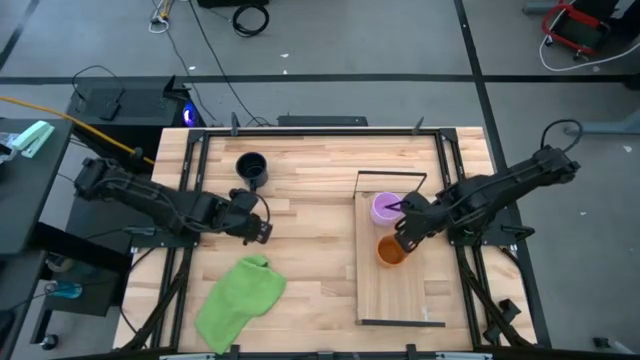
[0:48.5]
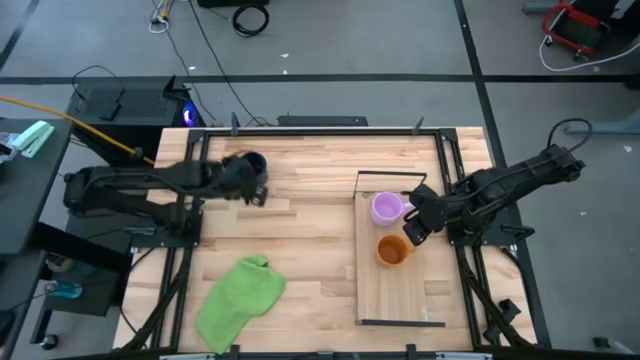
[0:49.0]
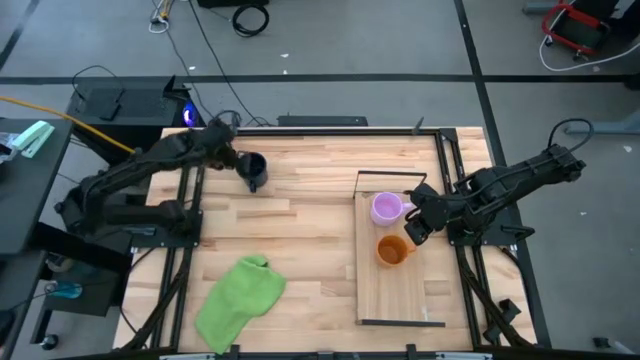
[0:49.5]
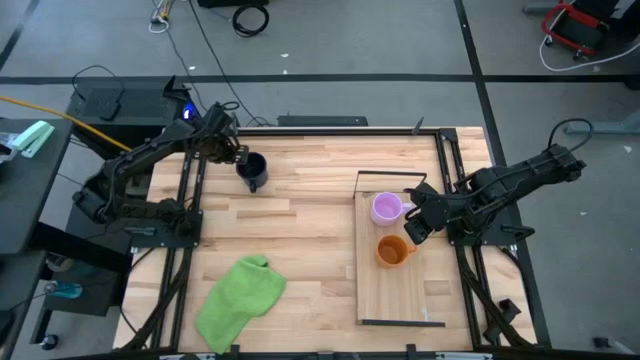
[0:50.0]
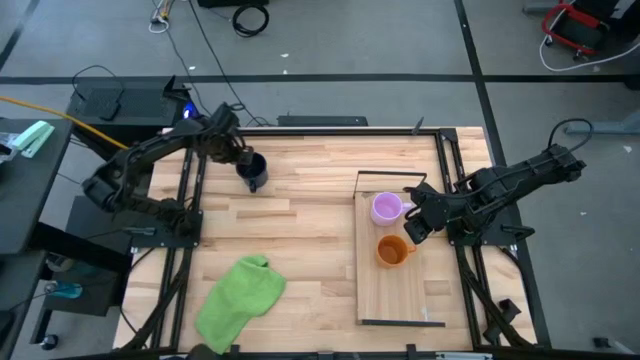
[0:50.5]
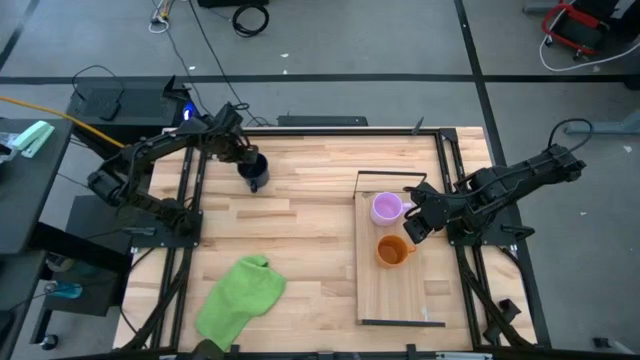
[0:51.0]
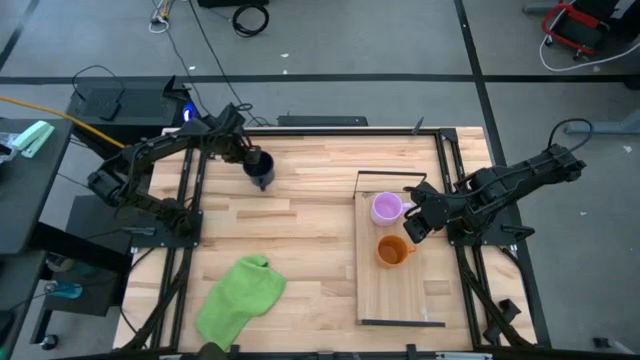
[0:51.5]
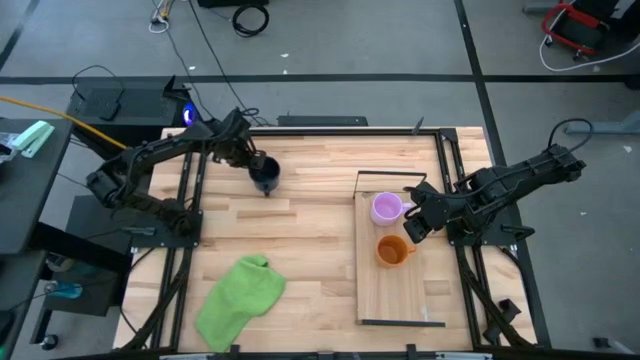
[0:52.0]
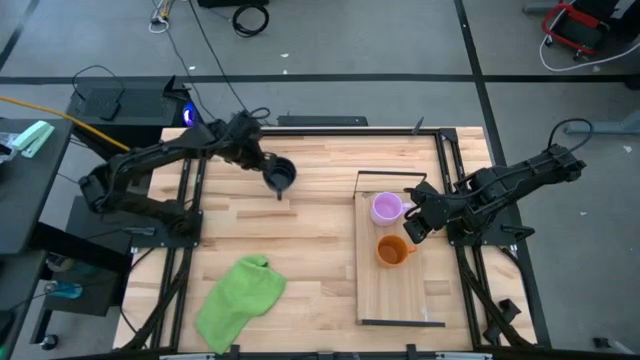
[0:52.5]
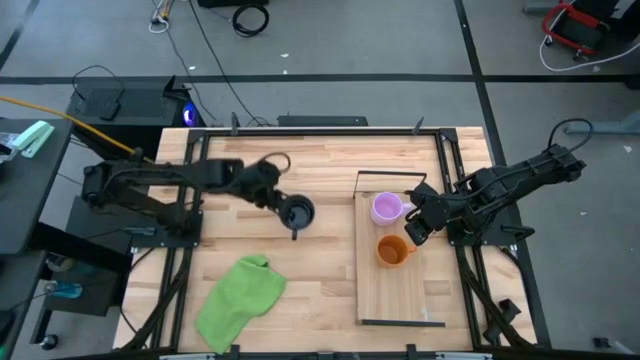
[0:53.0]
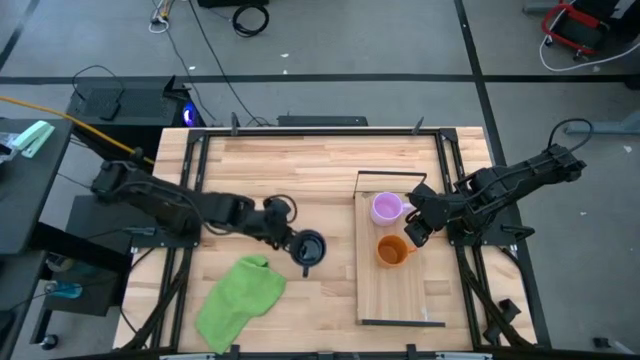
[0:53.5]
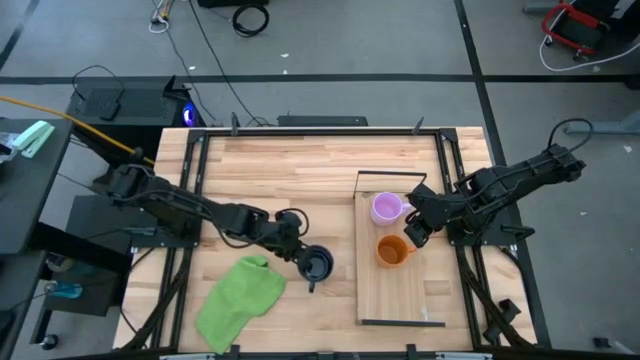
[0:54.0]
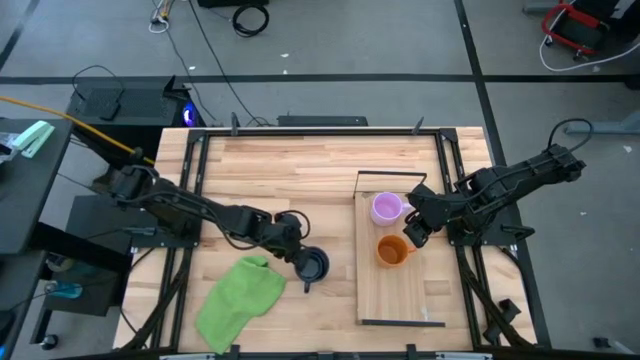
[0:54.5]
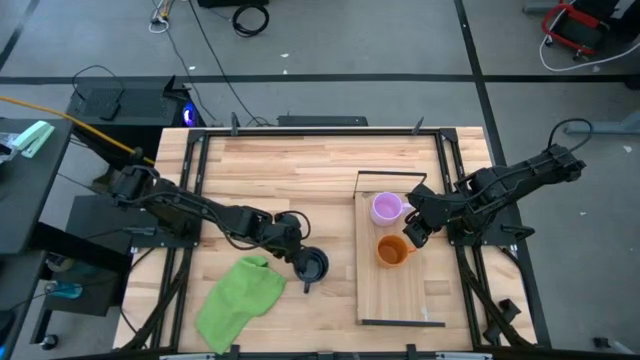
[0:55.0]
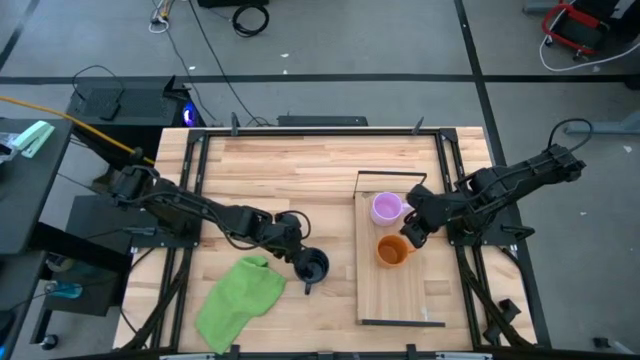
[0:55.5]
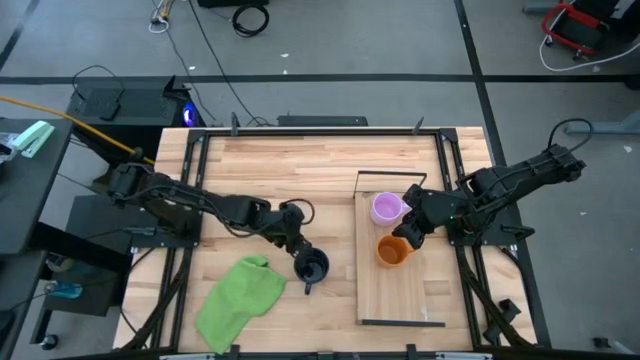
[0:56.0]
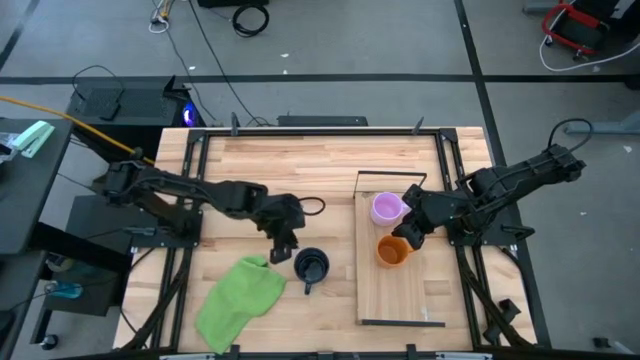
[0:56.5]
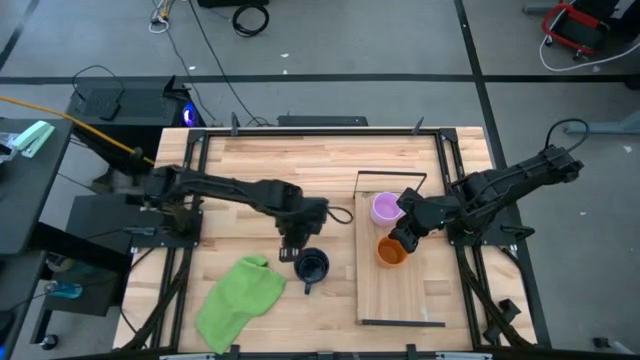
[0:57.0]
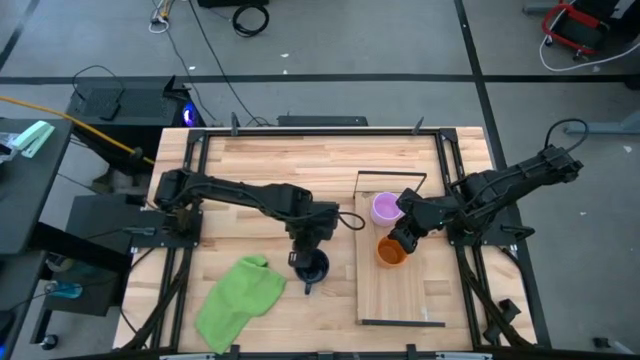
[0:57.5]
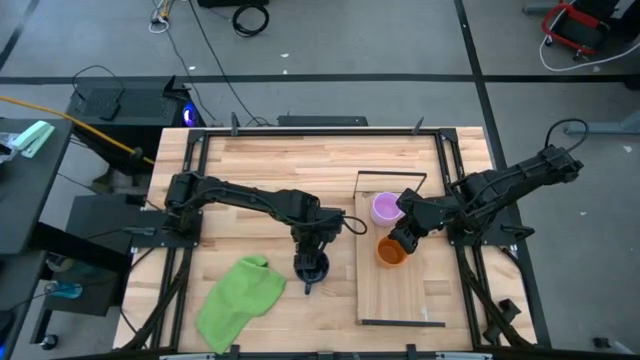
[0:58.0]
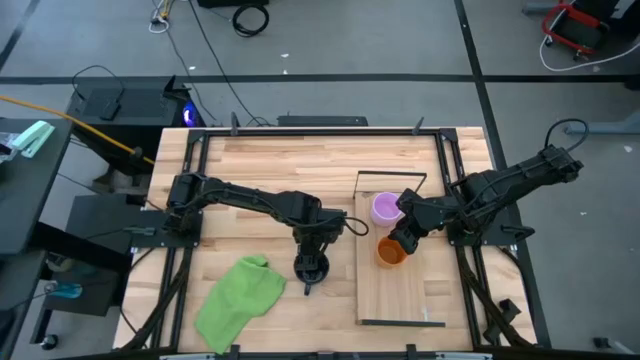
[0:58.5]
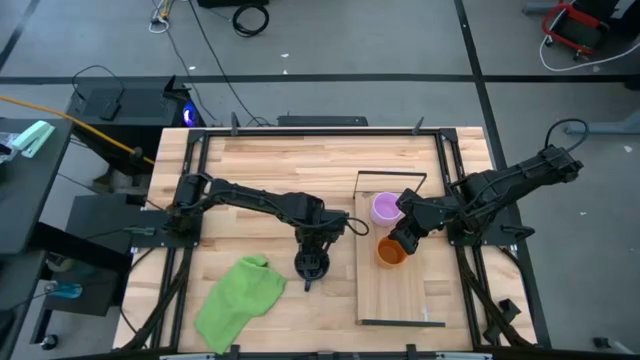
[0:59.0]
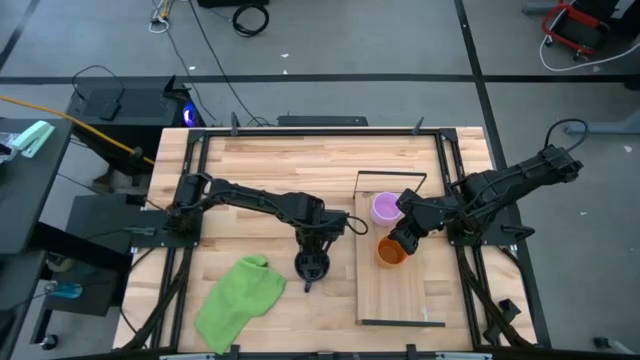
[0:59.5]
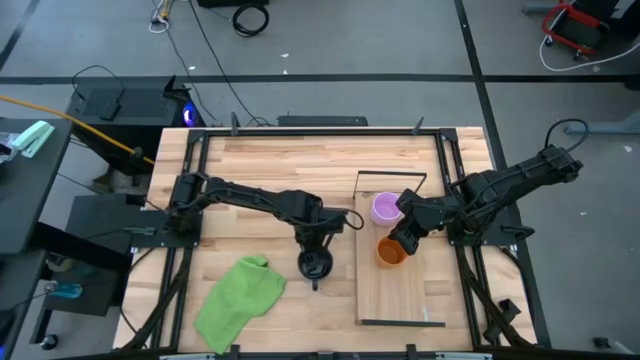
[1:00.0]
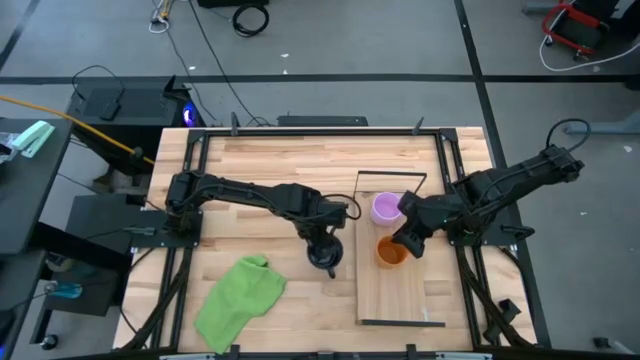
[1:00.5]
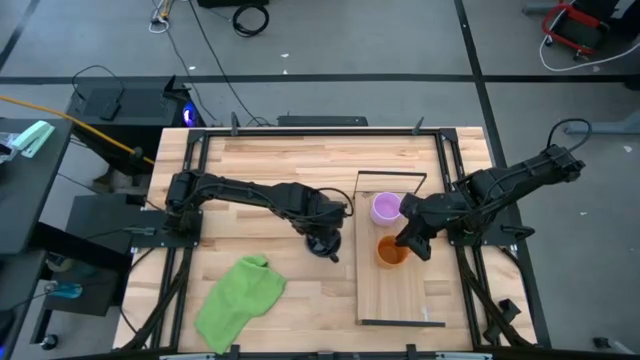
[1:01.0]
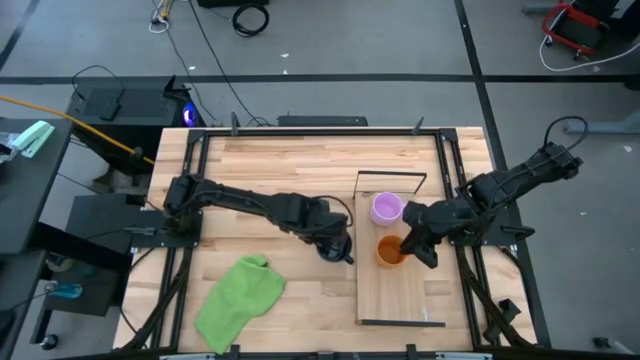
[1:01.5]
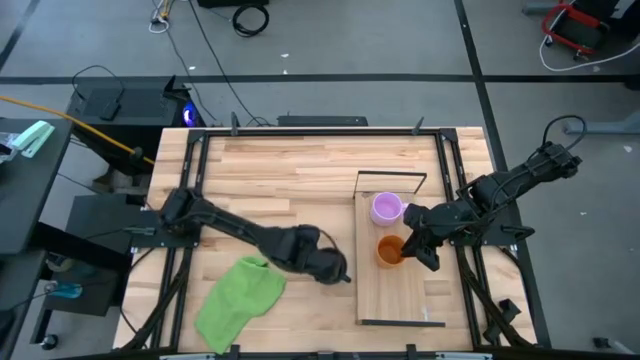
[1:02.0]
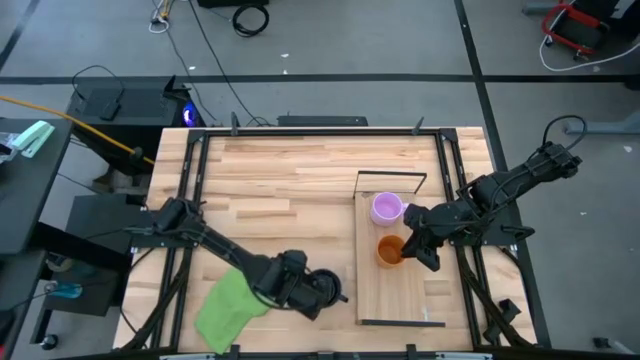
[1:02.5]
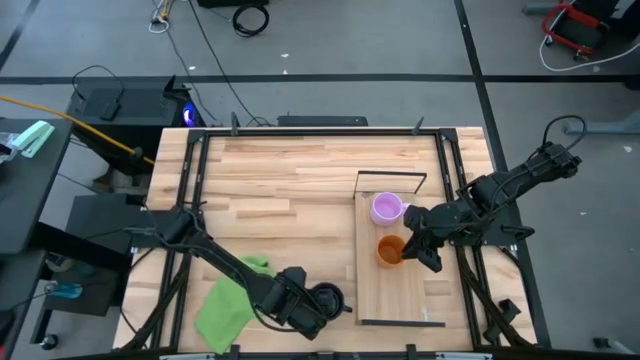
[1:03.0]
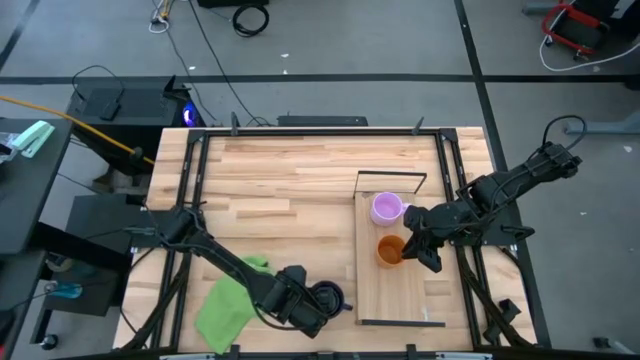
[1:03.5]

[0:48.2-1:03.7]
Task: Stack small to large cups/mugs on shelf
Put the black mug on the shelf

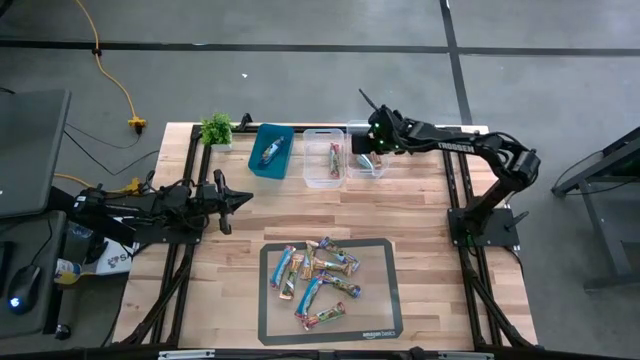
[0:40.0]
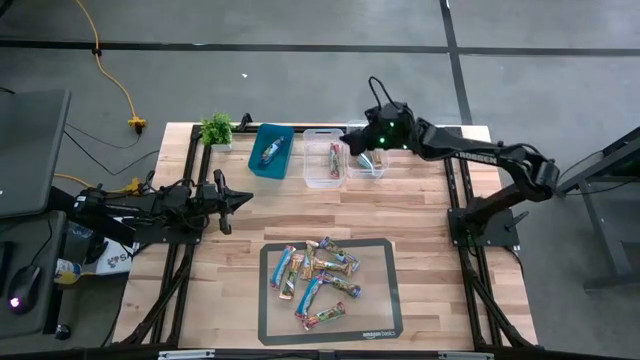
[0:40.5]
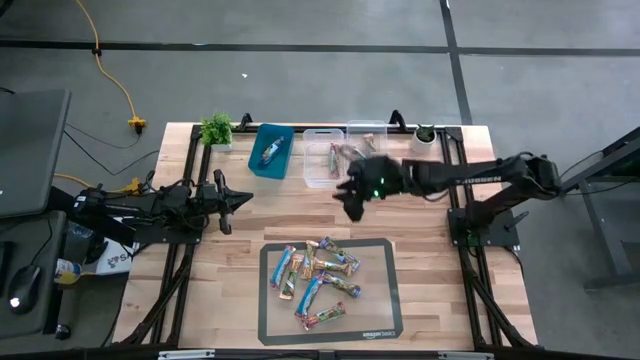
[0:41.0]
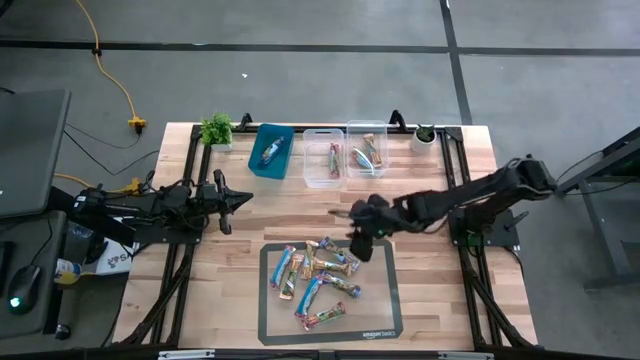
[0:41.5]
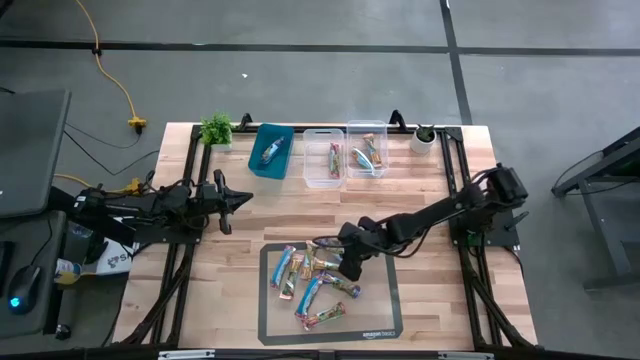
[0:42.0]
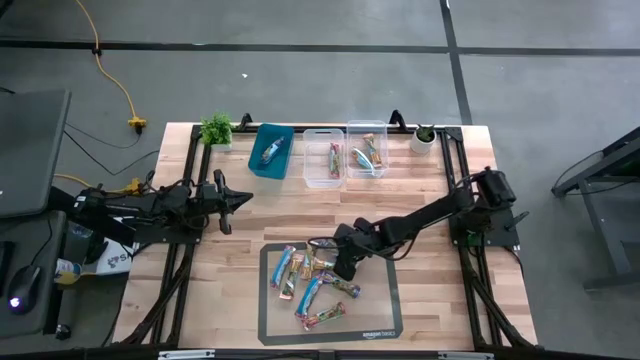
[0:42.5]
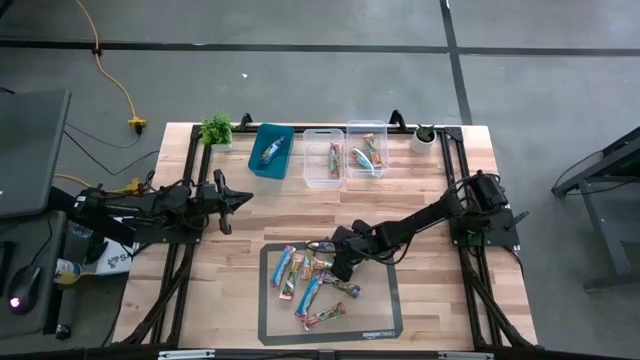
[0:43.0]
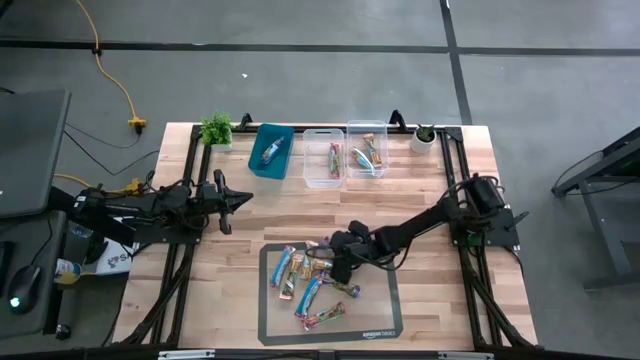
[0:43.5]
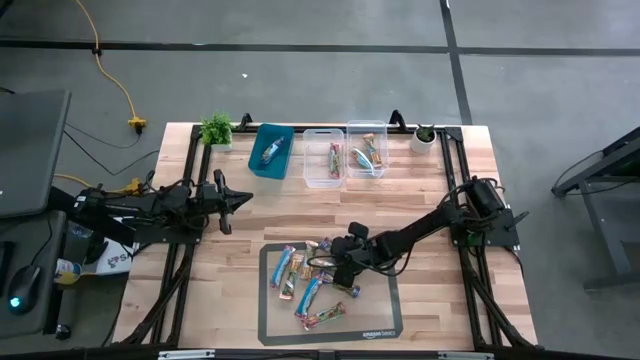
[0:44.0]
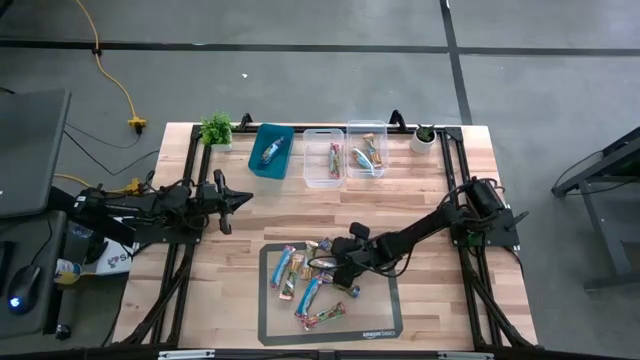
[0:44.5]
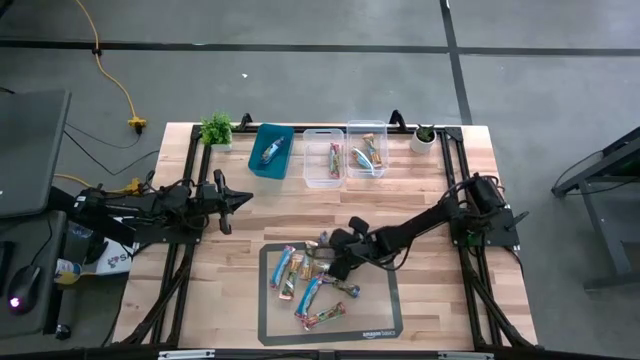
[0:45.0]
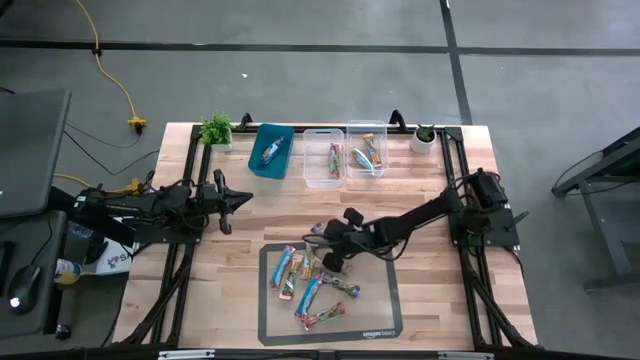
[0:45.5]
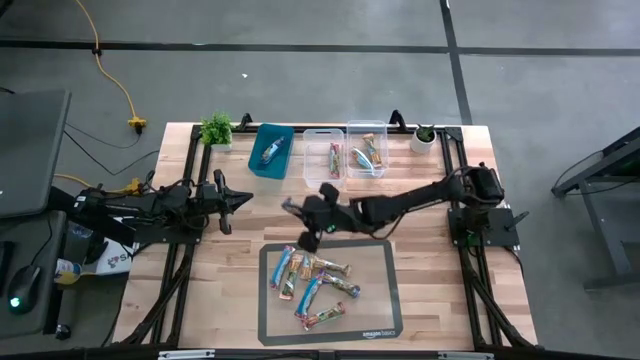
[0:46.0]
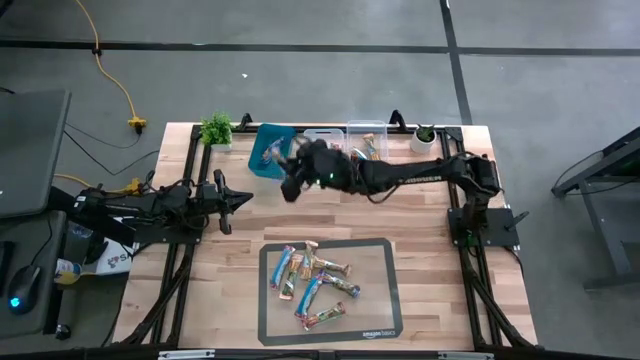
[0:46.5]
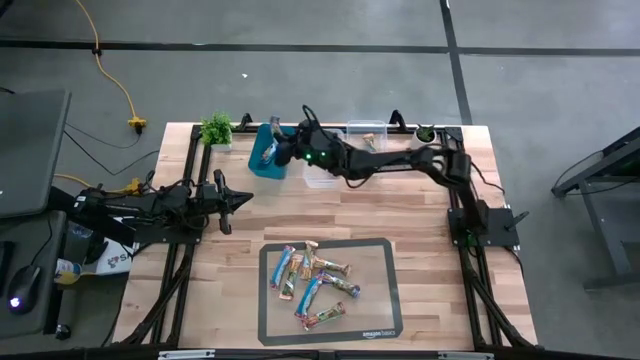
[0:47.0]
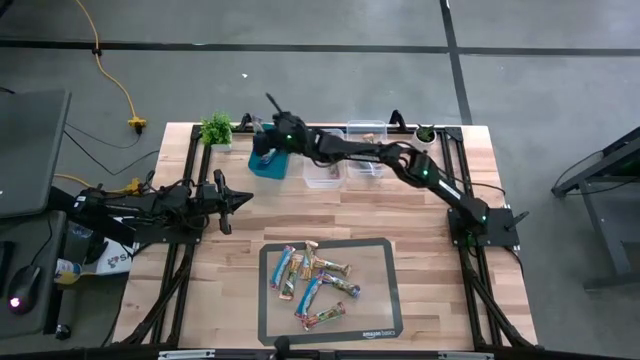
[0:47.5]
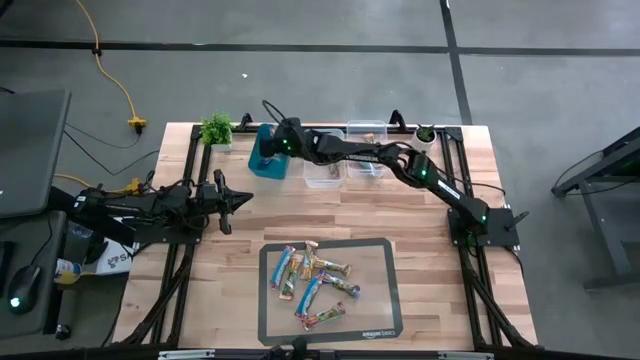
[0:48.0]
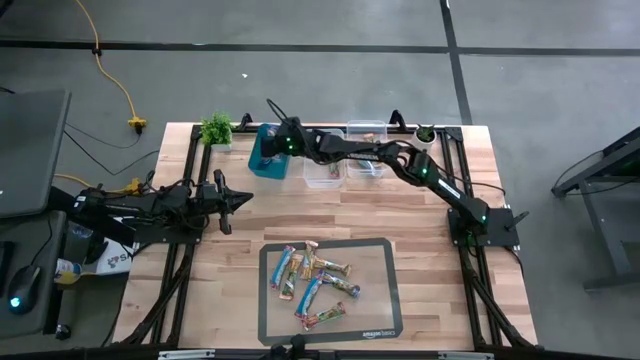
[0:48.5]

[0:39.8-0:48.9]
Task: Pick and place Granola Bars by type
Put the top blue granola bar into the blue bin
